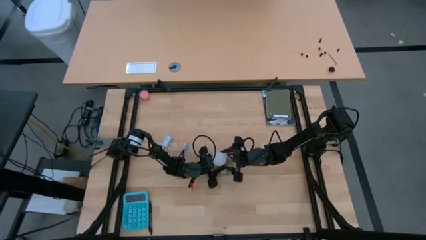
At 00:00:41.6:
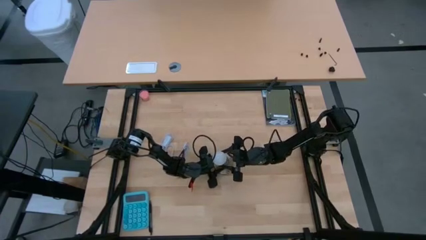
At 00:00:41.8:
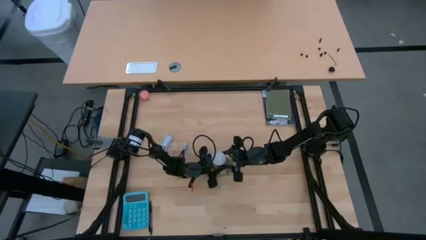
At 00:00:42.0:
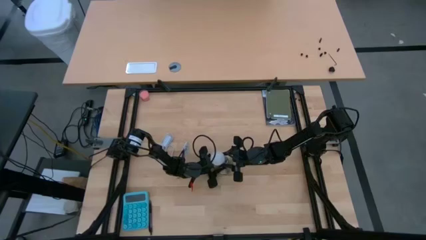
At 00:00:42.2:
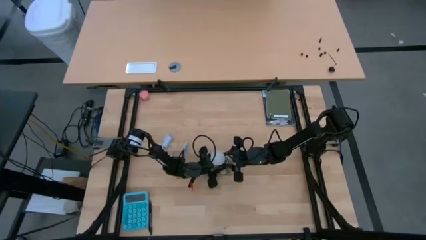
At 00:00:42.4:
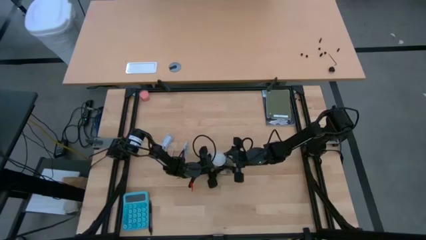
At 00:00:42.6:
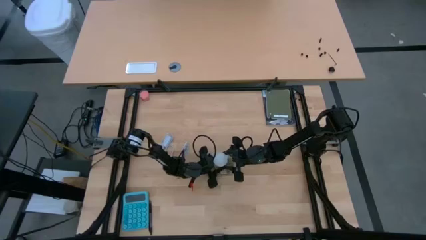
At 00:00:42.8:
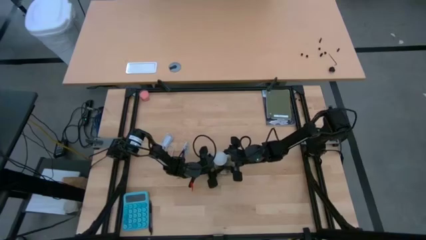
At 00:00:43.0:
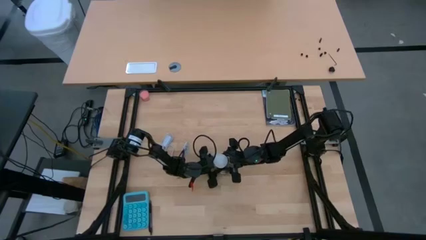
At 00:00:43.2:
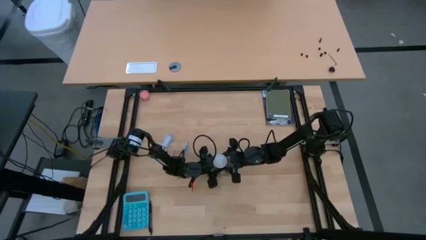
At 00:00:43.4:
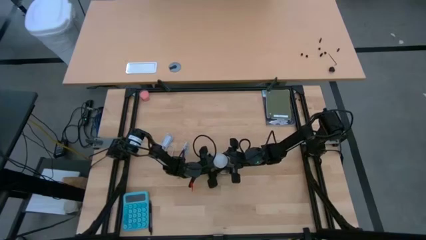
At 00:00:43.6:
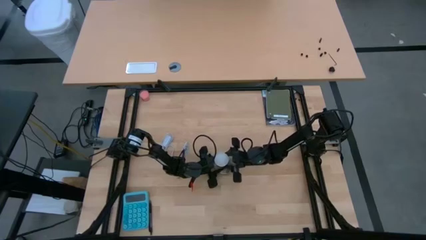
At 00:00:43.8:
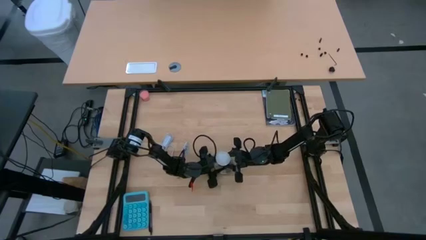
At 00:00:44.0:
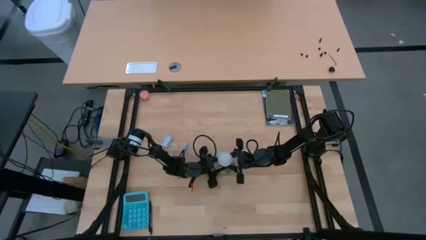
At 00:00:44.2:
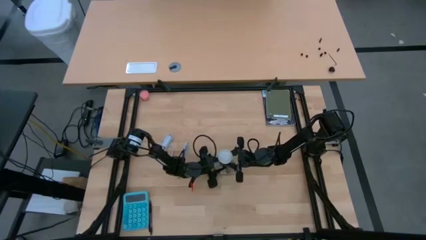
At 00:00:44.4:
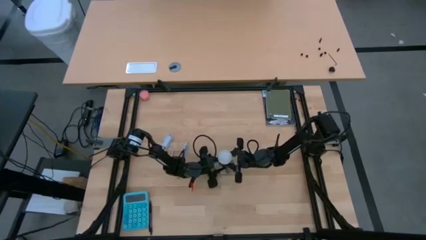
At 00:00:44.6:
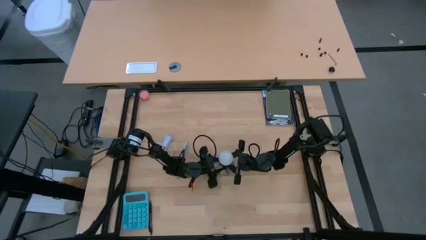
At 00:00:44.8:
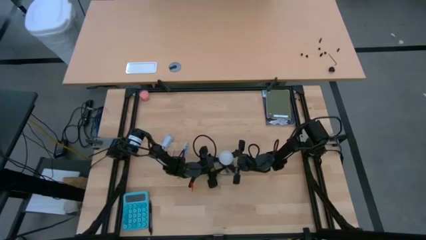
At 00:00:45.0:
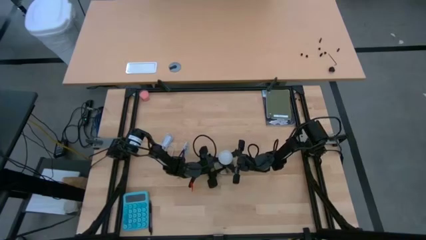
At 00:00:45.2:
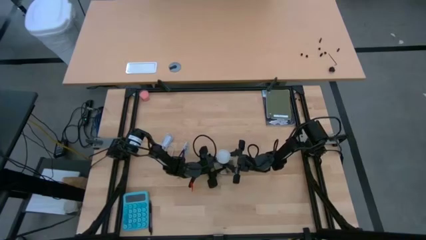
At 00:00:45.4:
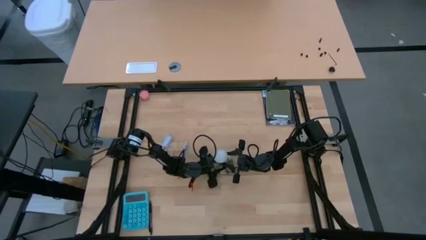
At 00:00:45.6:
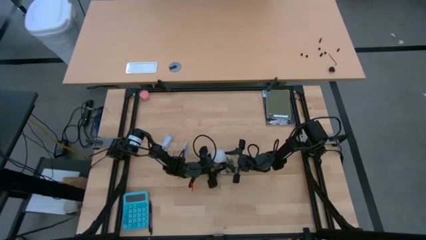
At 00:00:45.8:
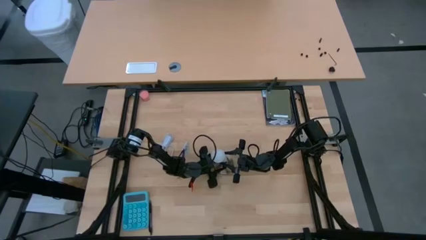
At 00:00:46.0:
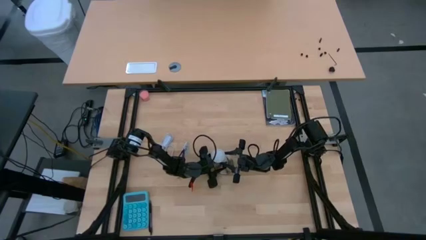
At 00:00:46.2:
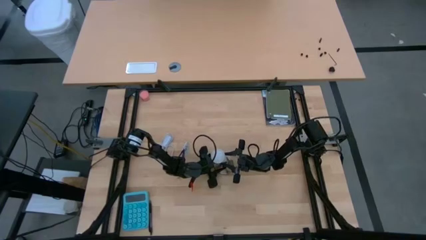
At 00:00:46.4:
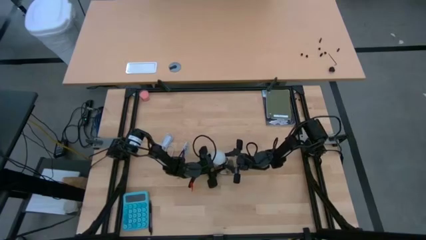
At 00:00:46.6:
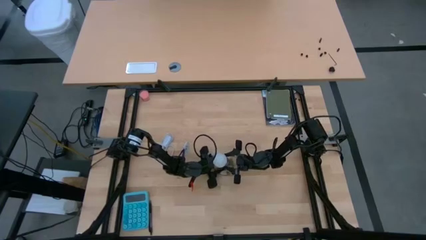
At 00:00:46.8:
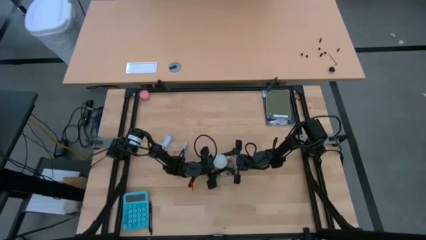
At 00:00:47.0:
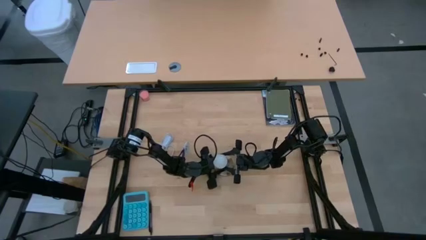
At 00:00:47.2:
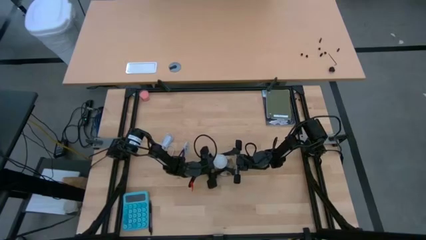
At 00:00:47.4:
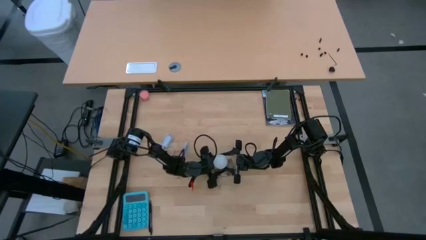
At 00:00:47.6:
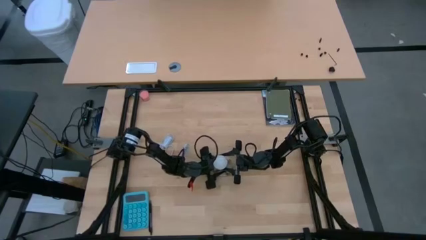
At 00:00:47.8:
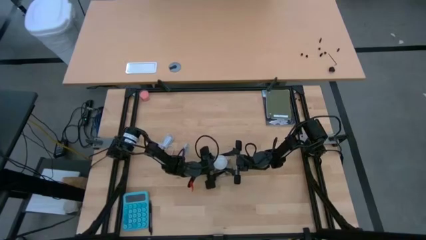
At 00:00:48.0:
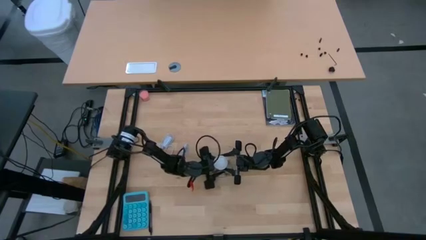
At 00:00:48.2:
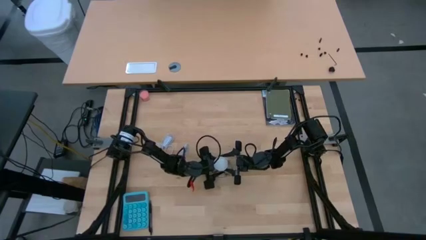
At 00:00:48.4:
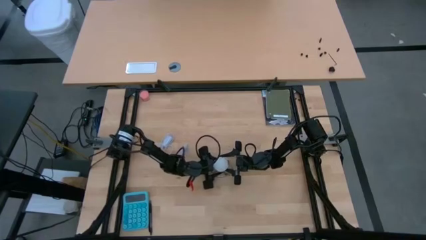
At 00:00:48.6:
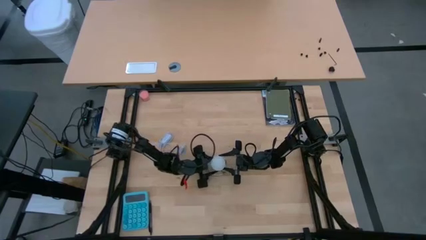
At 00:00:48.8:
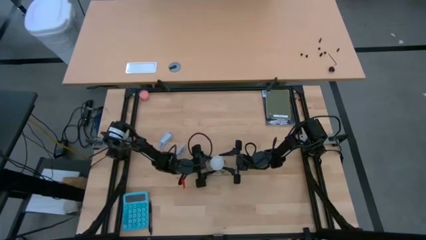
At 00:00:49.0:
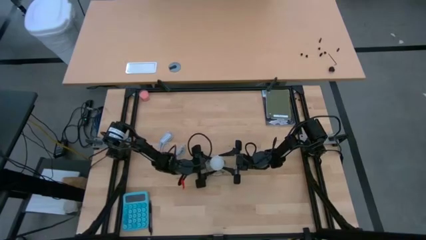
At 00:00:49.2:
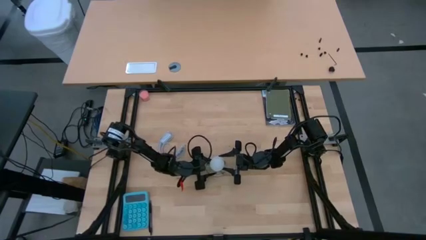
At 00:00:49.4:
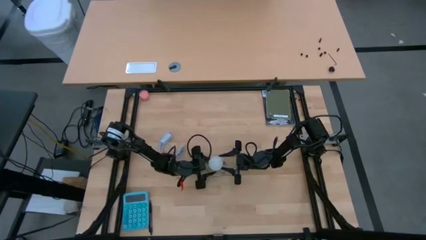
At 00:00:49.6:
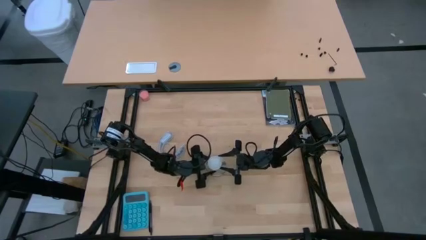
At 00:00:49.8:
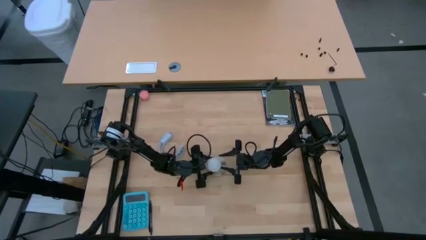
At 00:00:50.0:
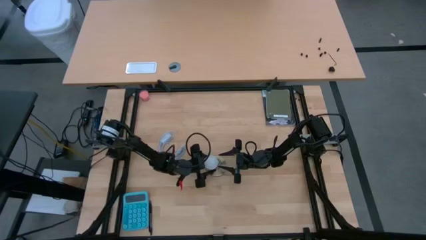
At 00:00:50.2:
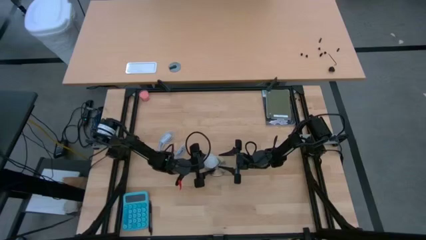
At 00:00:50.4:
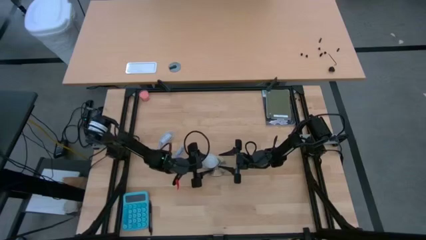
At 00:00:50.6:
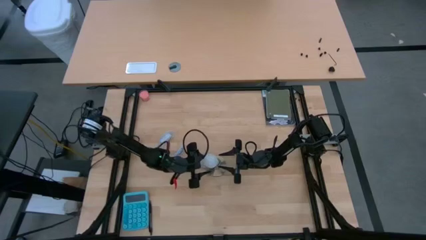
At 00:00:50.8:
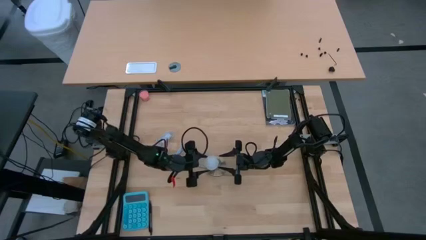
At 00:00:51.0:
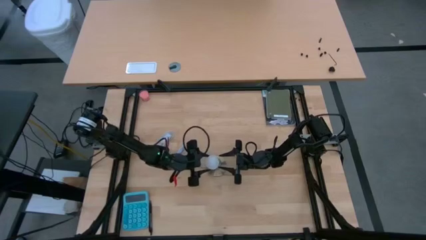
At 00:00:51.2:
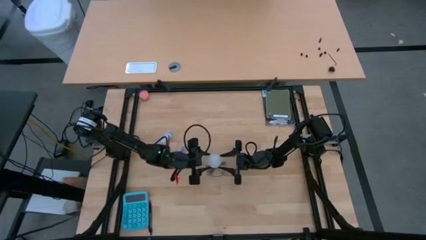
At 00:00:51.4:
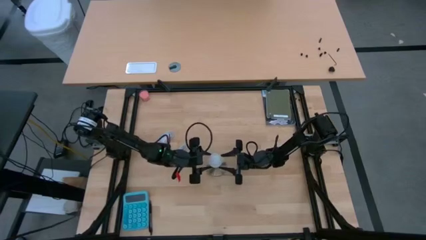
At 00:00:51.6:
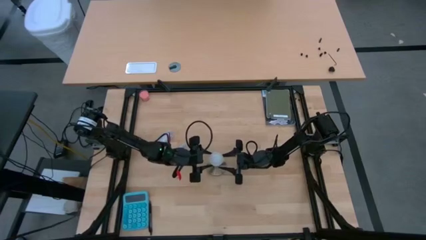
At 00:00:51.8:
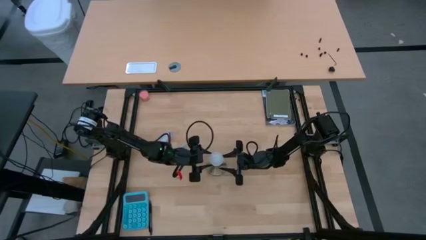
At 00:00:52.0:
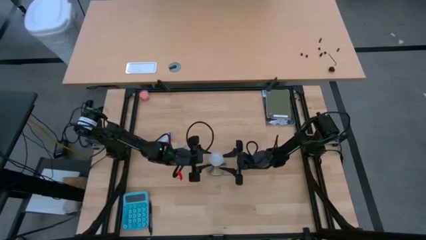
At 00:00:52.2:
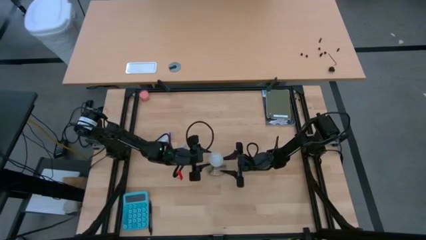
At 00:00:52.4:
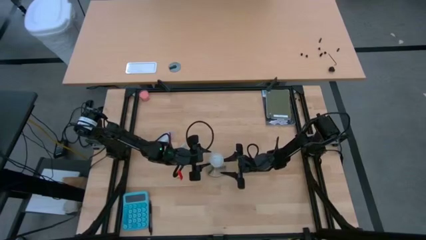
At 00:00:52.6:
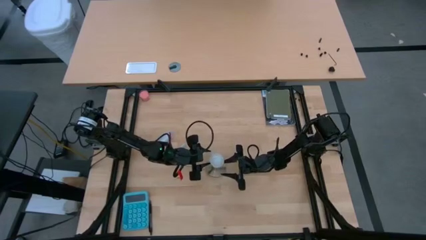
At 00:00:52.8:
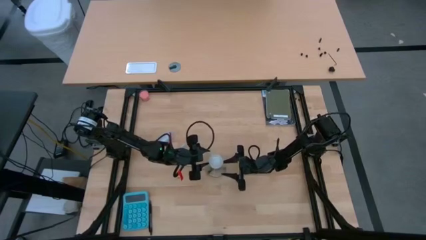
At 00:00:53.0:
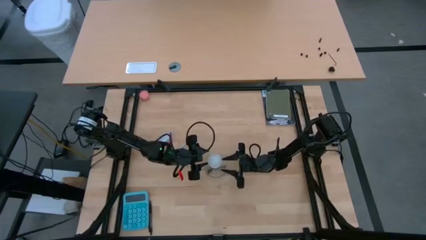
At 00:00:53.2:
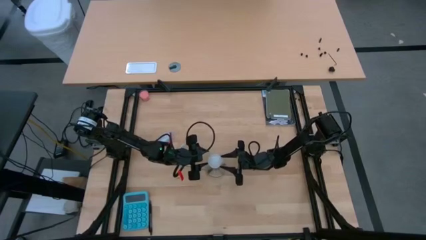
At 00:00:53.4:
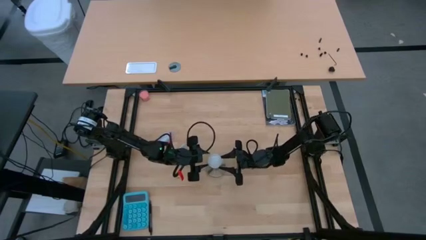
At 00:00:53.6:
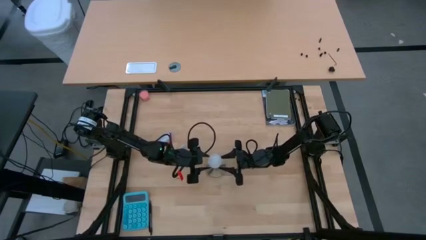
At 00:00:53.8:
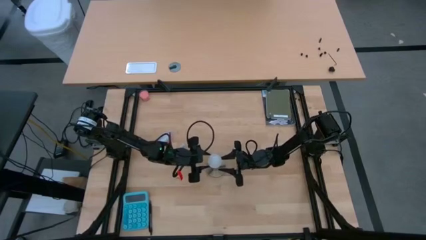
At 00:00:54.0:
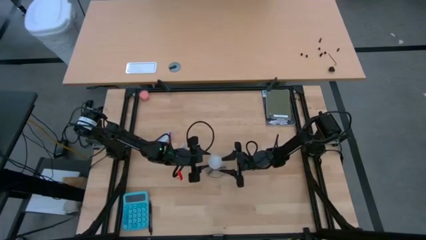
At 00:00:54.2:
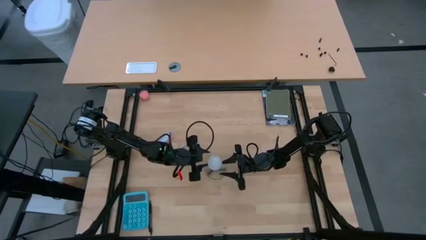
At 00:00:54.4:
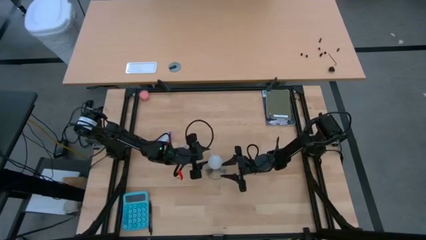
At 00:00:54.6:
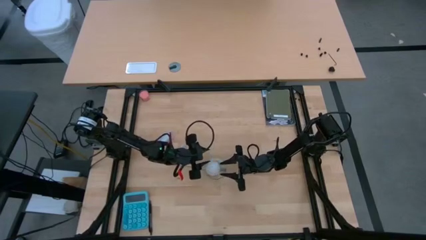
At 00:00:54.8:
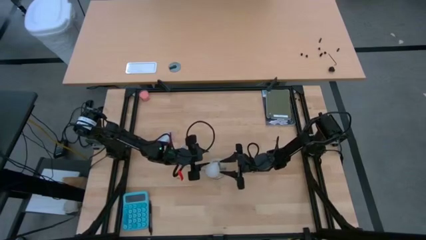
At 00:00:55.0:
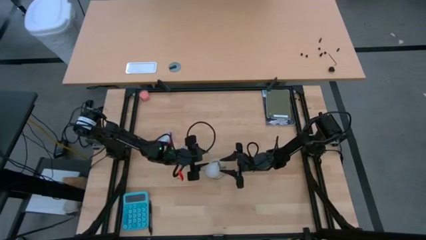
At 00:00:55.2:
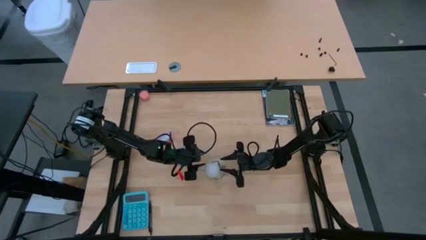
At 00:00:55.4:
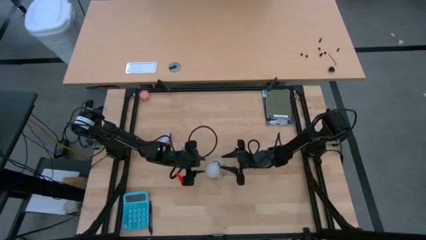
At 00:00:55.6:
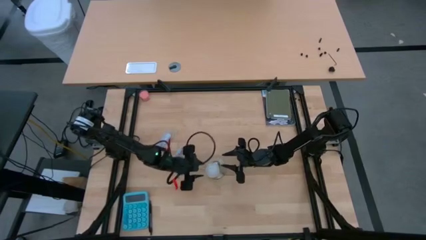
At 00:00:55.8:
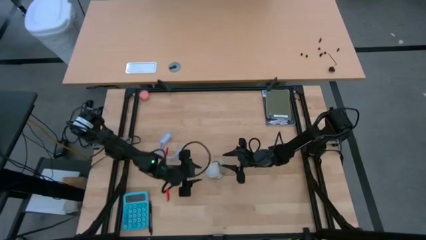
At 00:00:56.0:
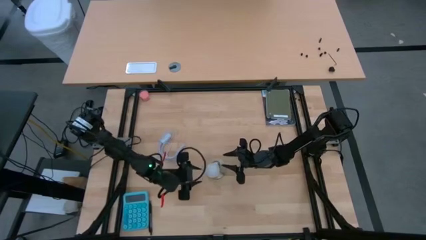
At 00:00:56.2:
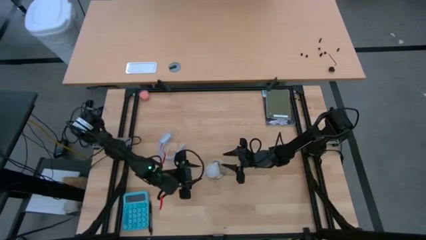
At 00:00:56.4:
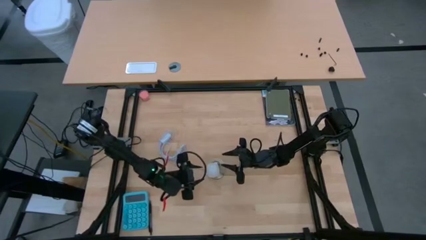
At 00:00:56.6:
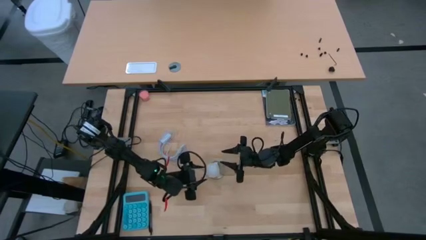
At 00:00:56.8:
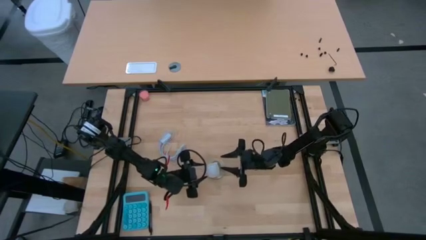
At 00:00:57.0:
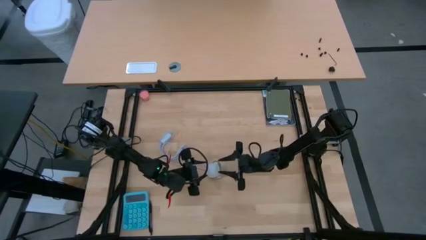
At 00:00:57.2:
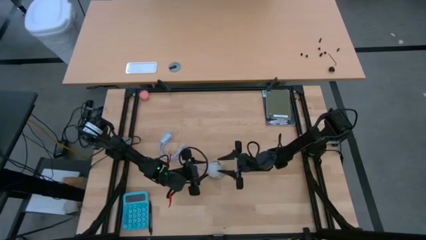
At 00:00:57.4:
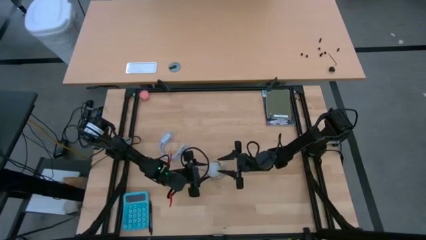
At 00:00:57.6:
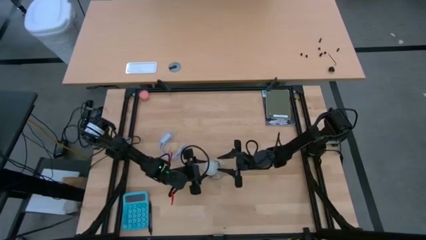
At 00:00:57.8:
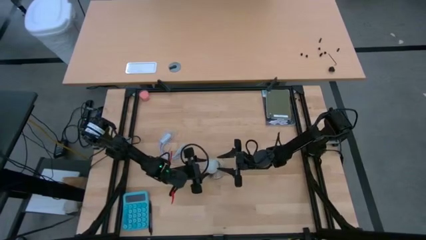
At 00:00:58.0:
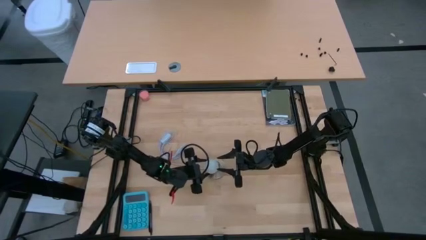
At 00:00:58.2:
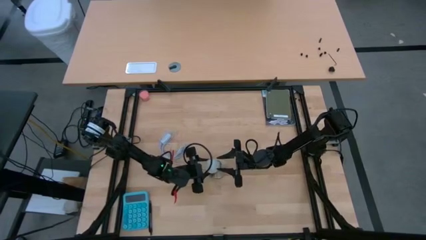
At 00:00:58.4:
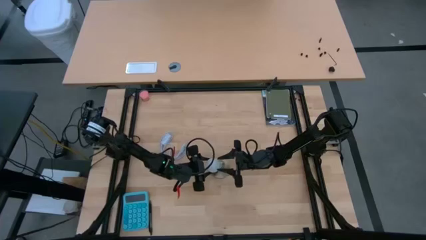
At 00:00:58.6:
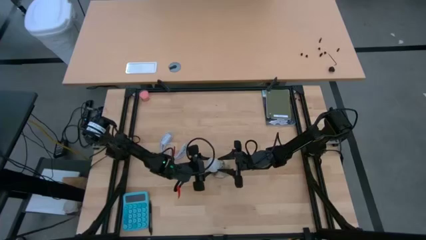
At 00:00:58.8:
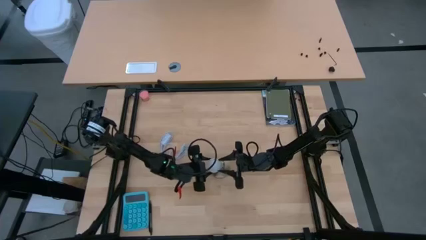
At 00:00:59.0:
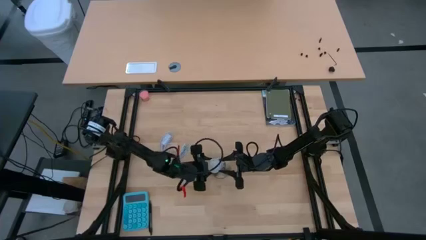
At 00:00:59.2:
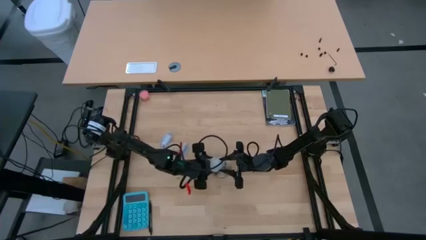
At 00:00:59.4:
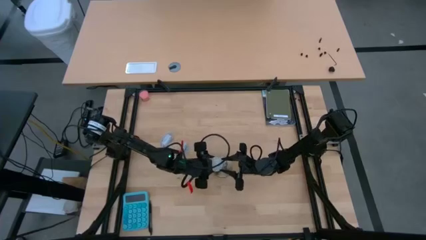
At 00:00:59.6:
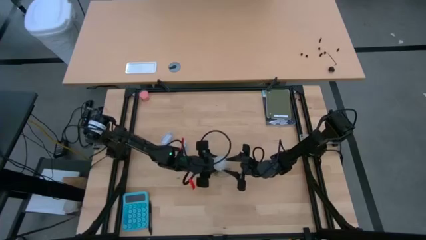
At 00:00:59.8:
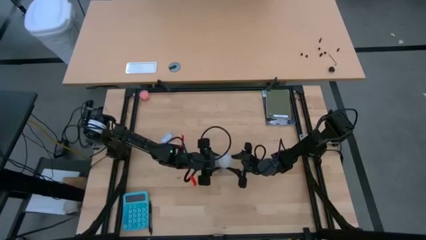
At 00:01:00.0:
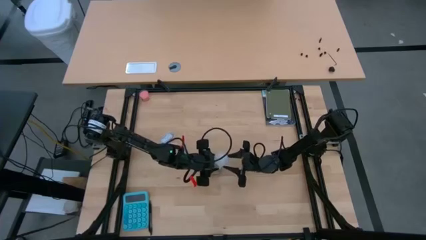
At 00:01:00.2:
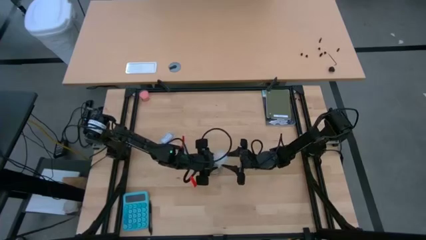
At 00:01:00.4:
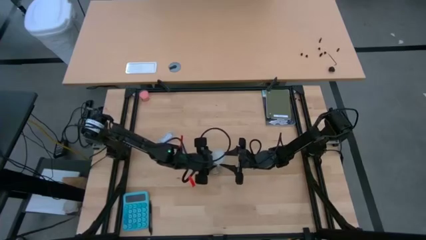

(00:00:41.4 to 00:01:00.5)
Task: Screw lightbulb
Insert the lightbulb into the lamp holder
